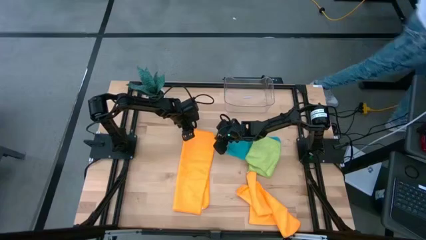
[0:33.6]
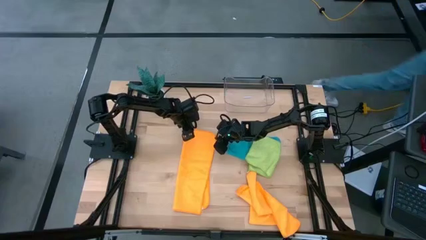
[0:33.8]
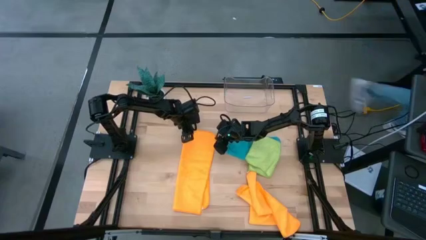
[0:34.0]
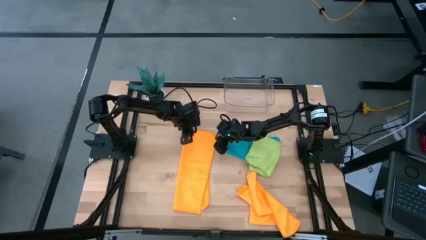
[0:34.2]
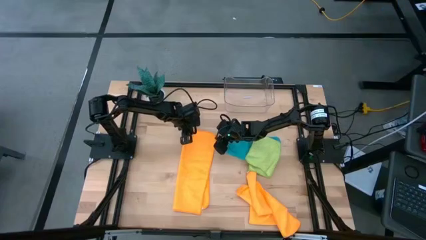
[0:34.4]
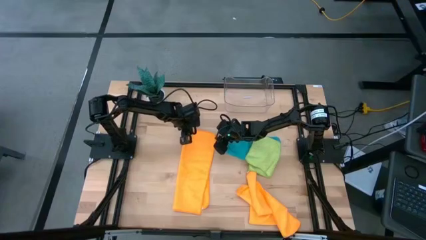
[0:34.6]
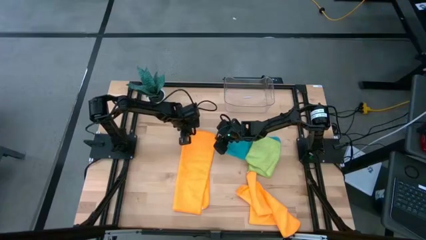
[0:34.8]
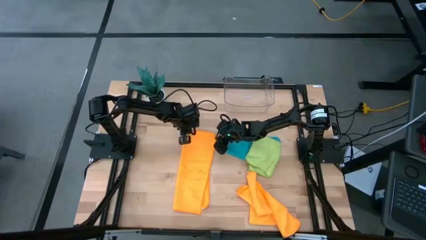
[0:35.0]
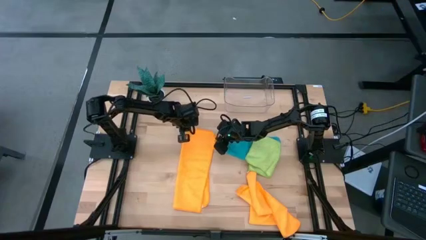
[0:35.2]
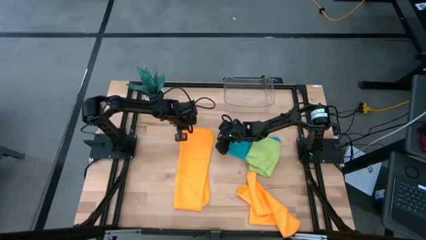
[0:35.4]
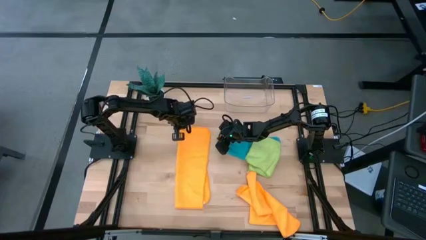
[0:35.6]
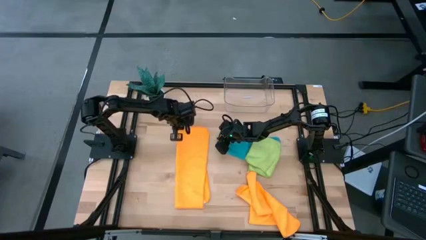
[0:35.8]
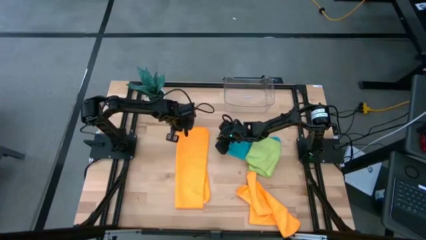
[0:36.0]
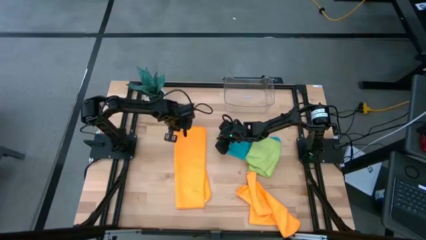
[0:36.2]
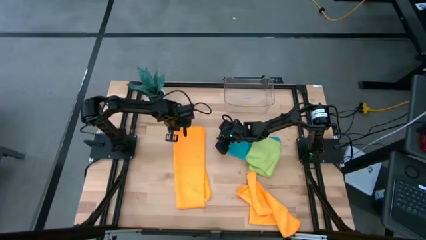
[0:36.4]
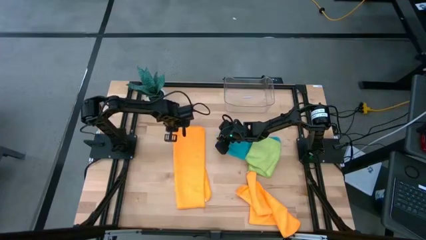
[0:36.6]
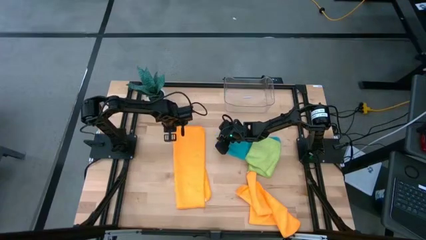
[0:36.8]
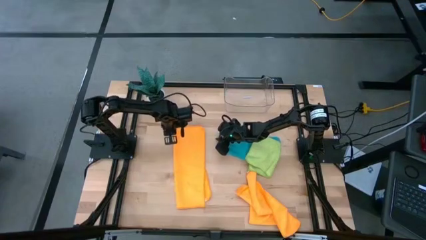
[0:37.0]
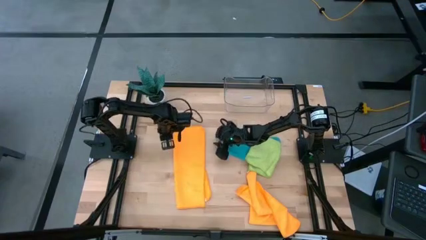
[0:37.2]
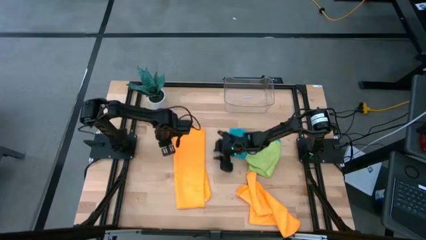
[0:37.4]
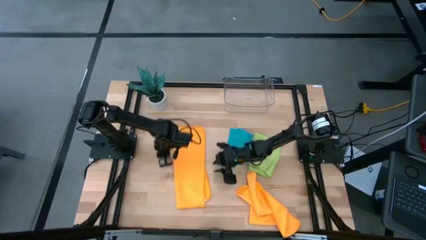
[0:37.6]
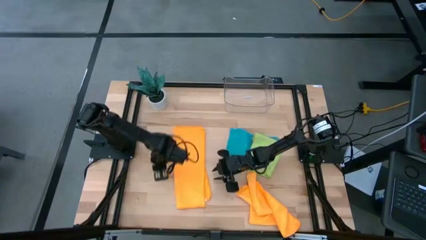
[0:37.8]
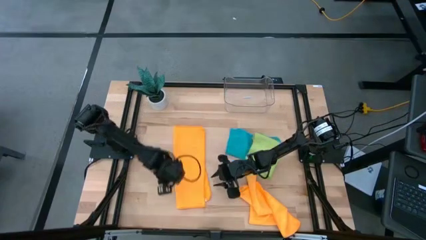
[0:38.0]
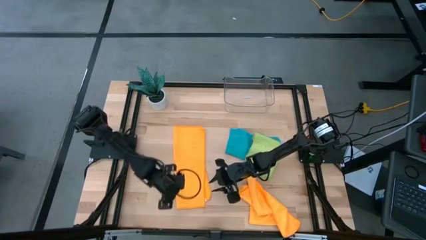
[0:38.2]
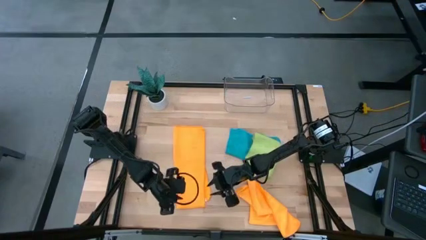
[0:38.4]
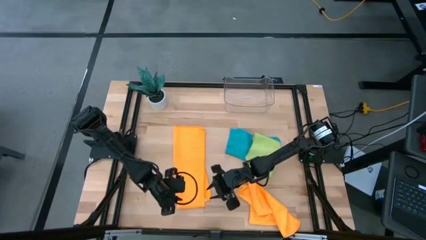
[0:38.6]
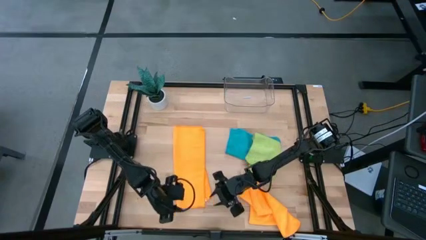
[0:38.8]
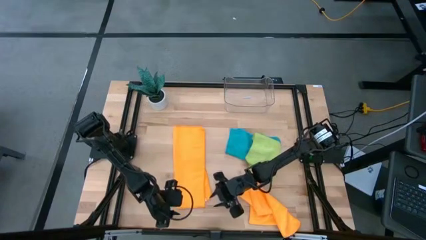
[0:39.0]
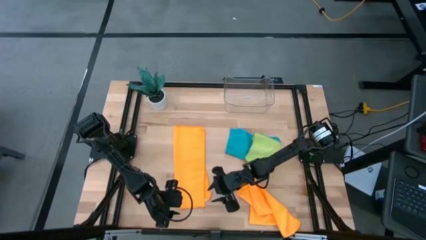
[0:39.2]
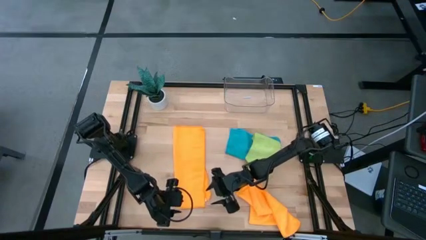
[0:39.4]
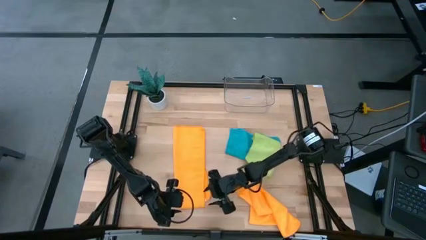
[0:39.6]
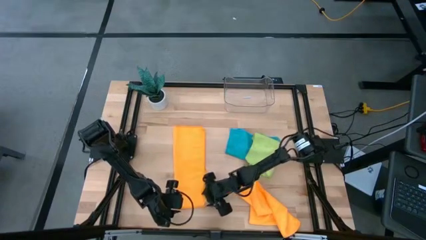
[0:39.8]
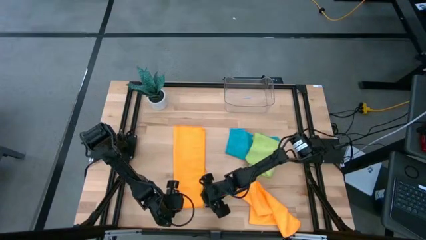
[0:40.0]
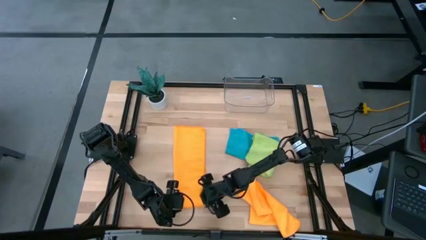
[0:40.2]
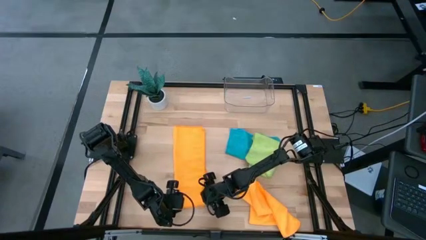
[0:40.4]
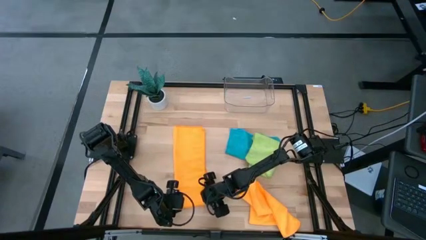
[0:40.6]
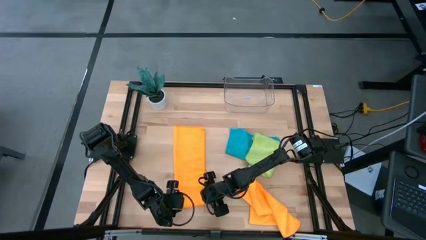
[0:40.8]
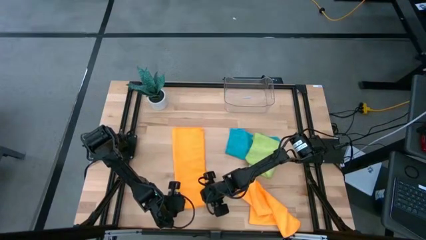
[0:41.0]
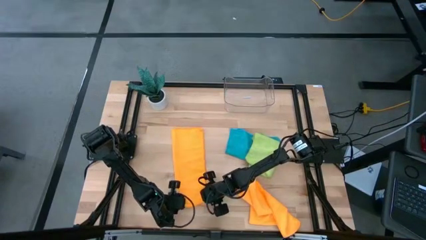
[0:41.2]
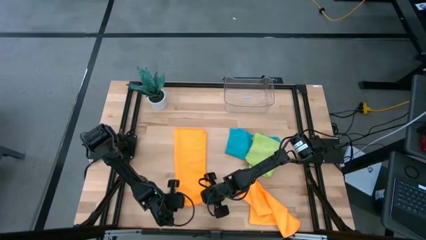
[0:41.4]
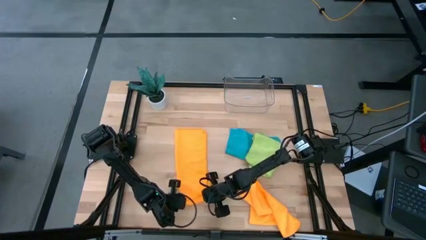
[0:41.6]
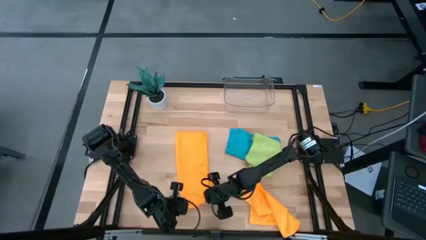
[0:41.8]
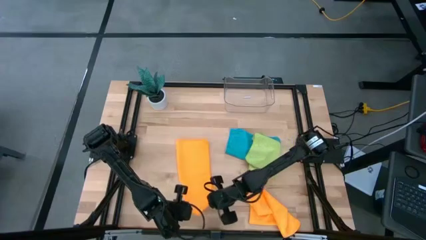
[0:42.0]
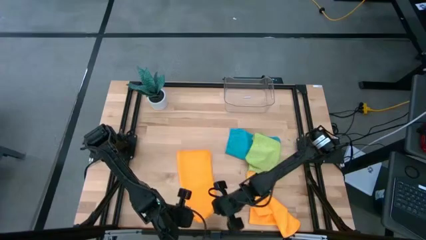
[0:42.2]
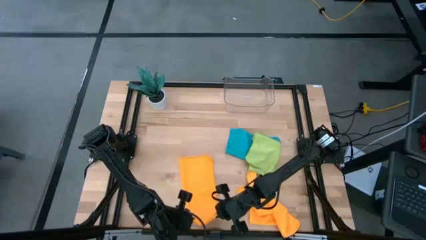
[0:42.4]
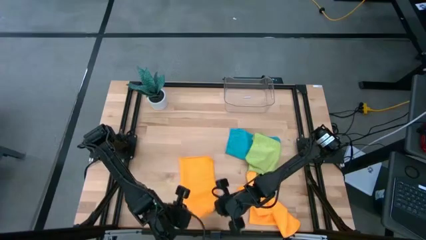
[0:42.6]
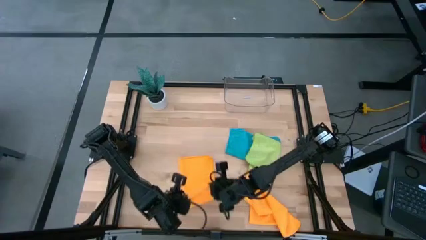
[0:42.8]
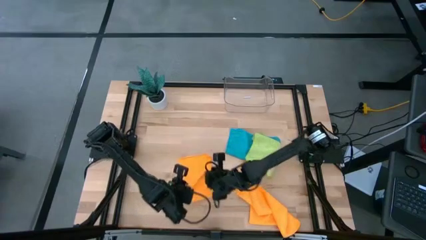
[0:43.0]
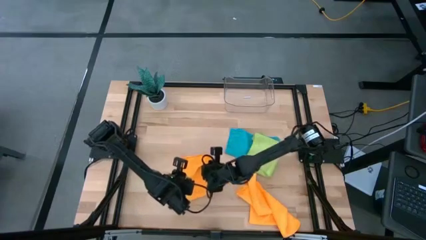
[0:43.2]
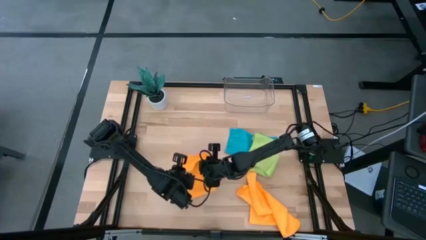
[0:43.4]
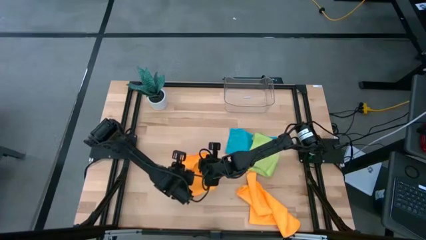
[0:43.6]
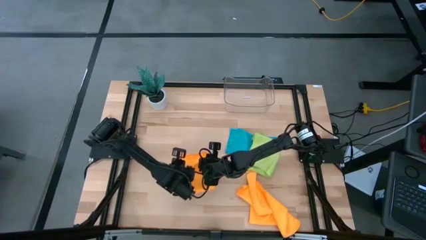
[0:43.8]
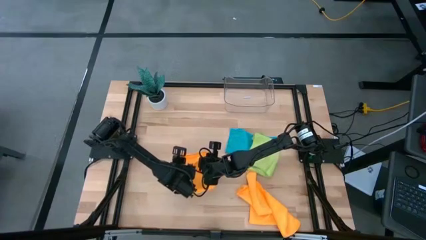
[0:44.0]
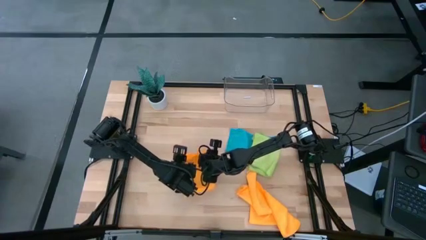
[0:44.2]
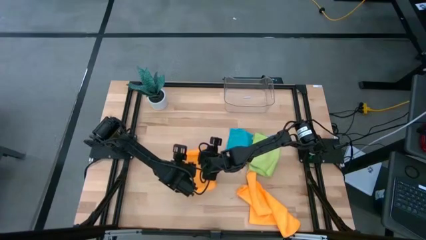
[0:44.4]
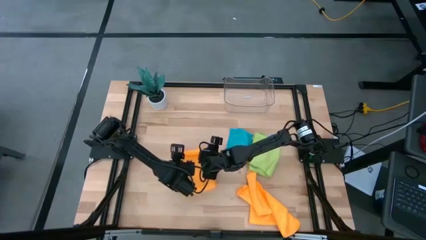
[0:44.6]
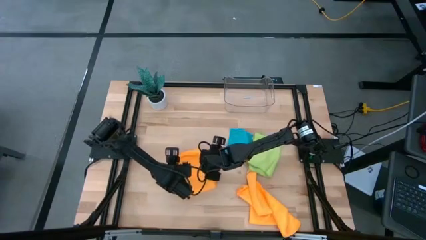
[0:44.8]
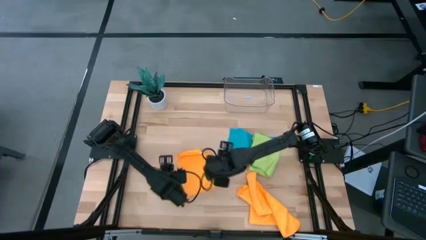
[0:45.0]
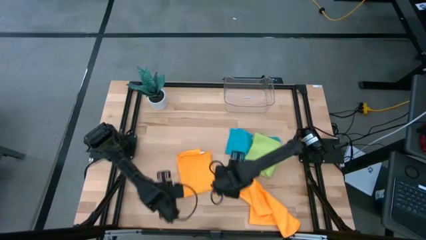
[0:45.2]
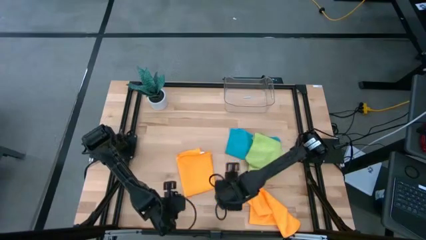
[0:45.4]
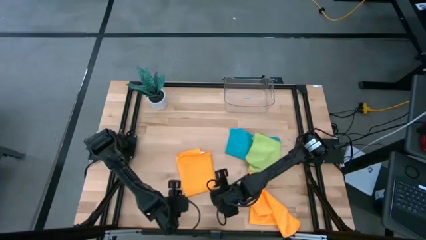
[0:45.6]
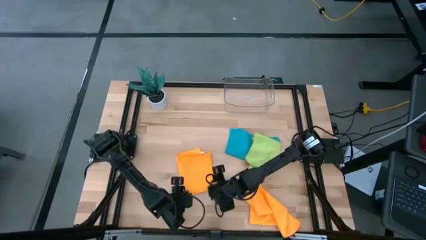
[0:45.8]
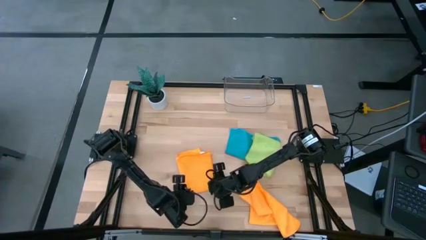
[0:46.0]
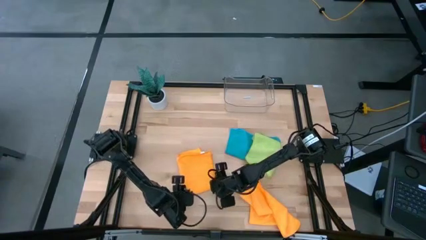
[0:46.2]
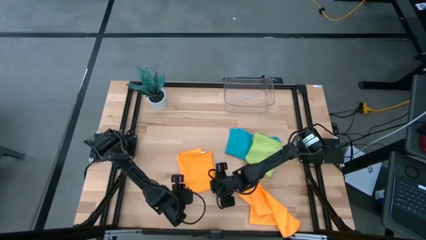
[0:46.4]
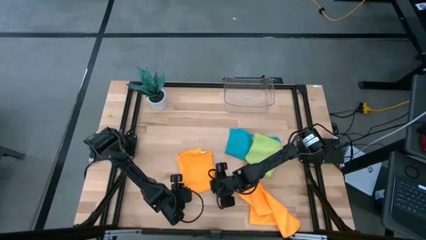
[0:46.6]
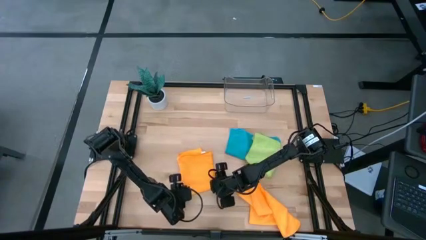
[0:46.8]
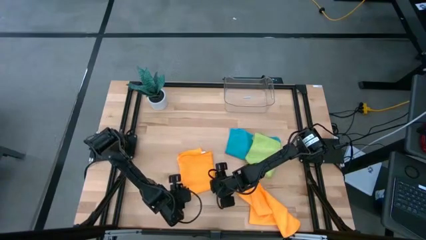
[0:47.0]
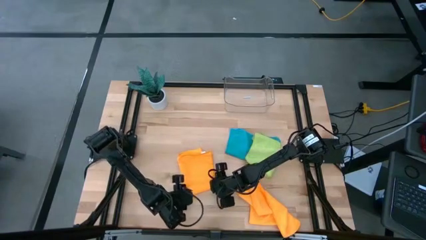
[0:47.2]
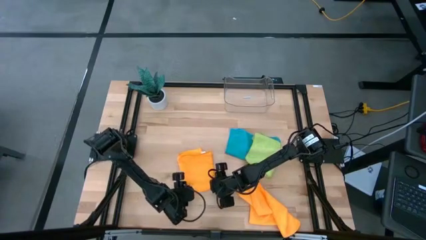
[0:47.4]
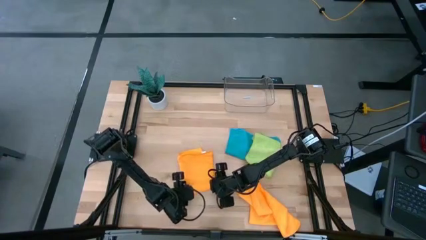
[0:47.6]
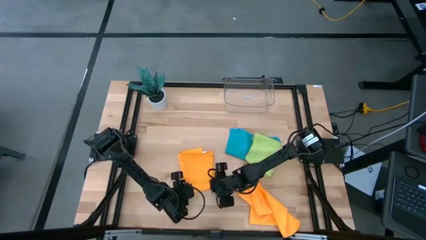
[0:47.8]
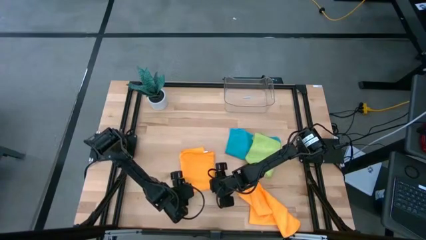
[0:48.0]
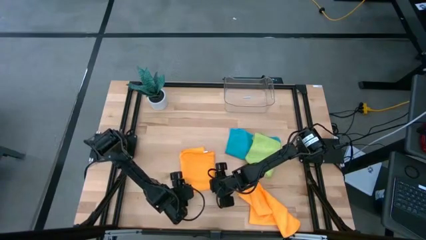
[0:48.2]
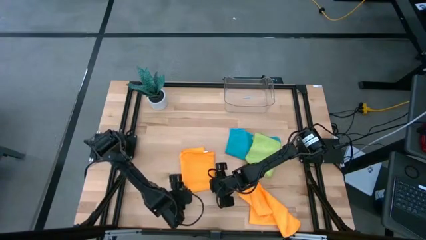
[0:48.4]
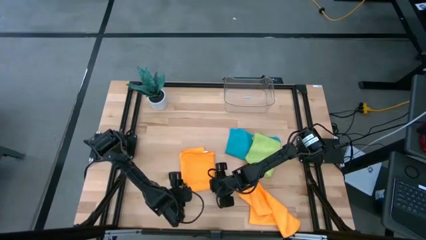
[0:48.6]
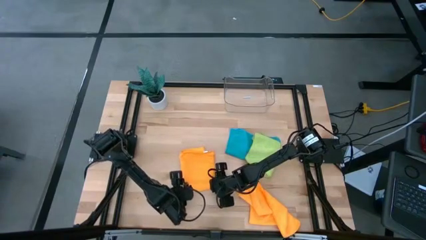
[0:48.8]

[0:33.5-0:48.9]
Task: Fold microfiber towels
Fold the top orange microfiber towel
